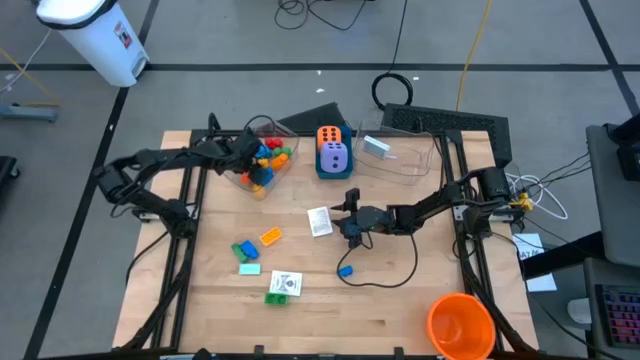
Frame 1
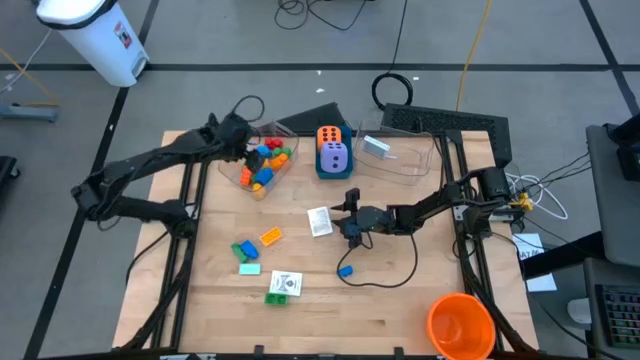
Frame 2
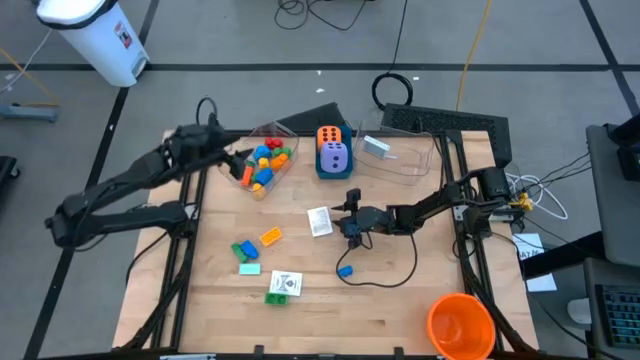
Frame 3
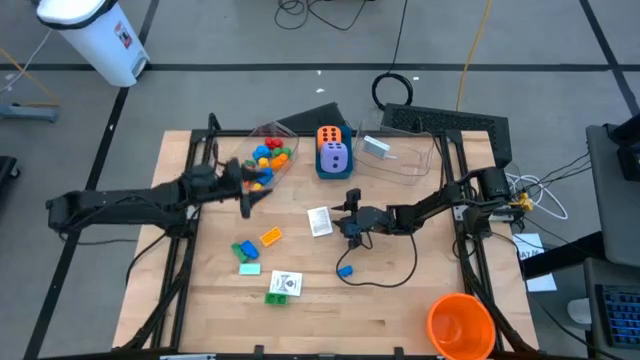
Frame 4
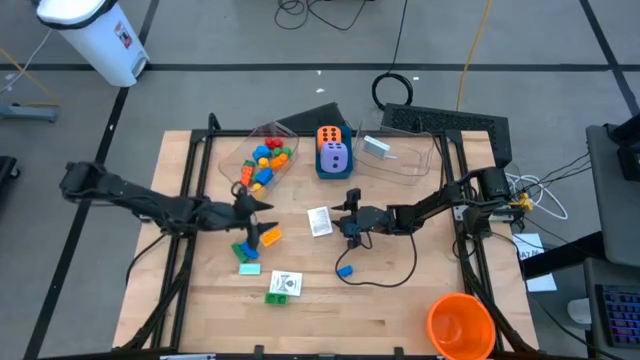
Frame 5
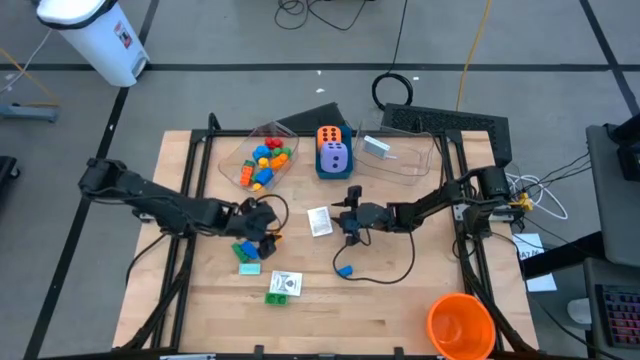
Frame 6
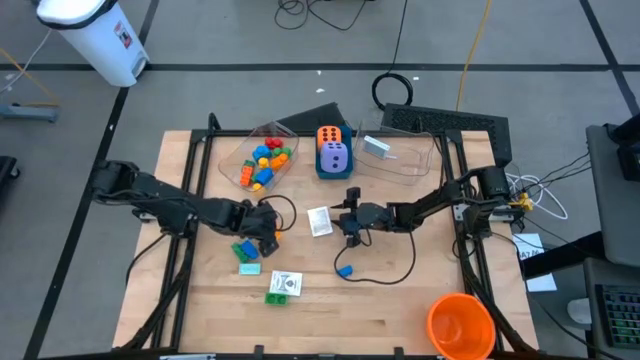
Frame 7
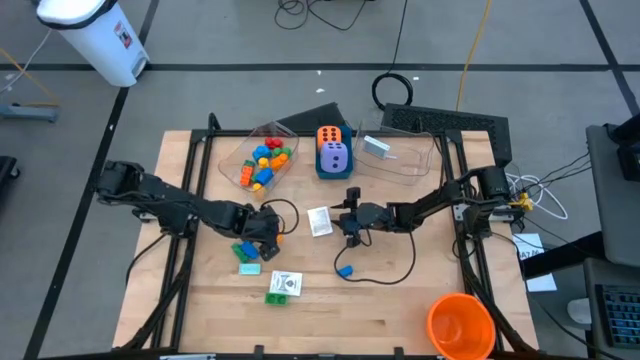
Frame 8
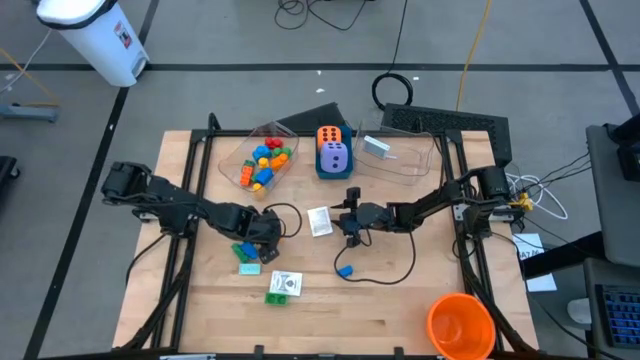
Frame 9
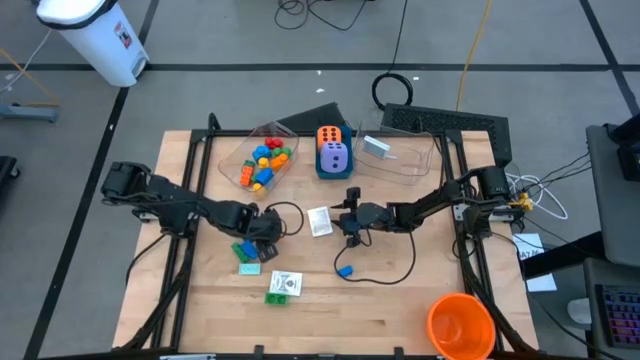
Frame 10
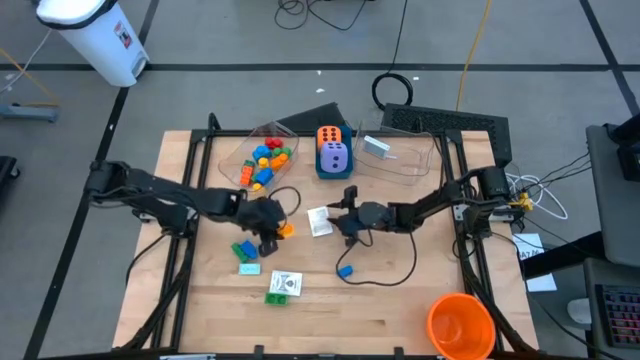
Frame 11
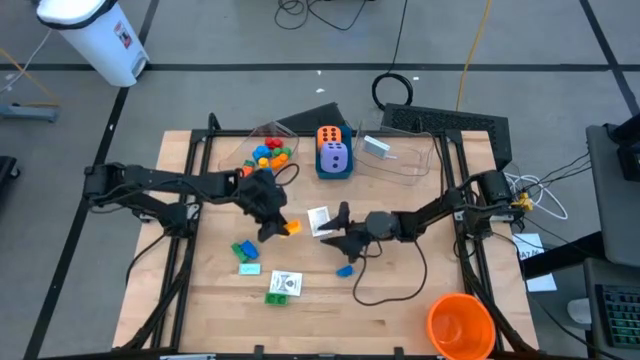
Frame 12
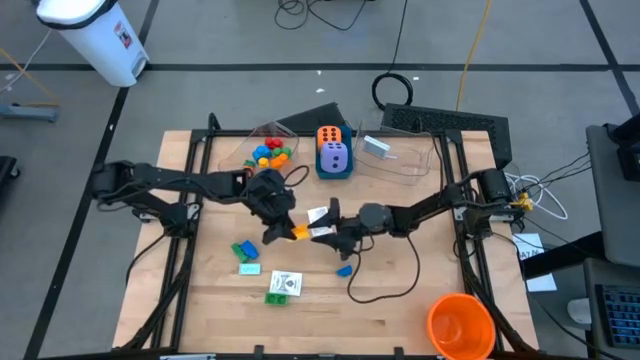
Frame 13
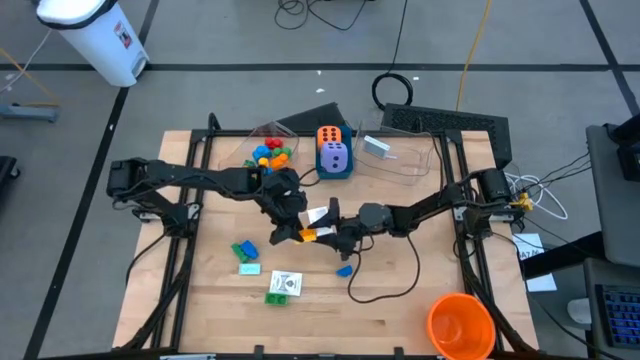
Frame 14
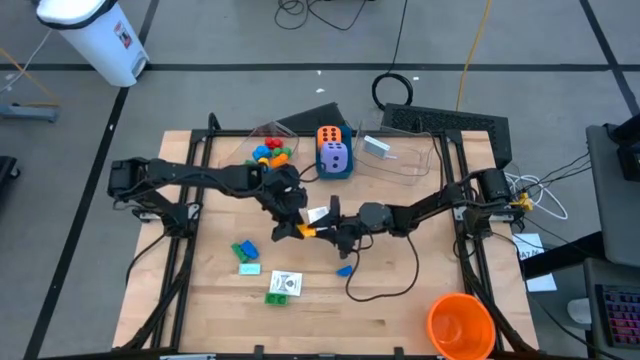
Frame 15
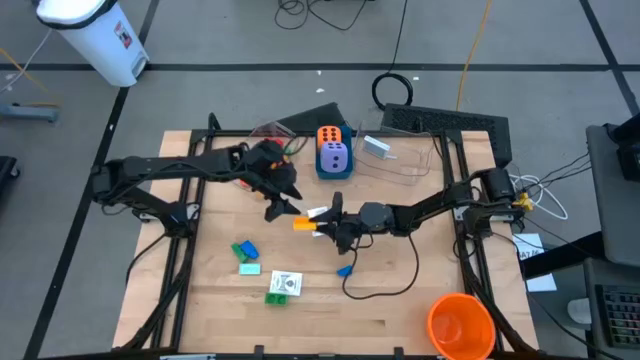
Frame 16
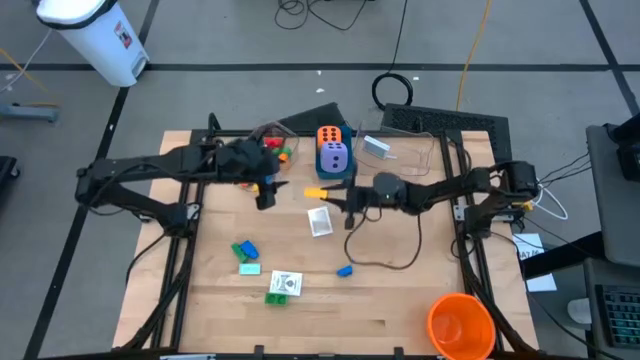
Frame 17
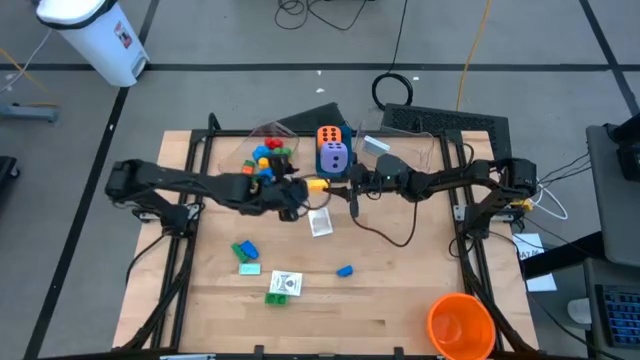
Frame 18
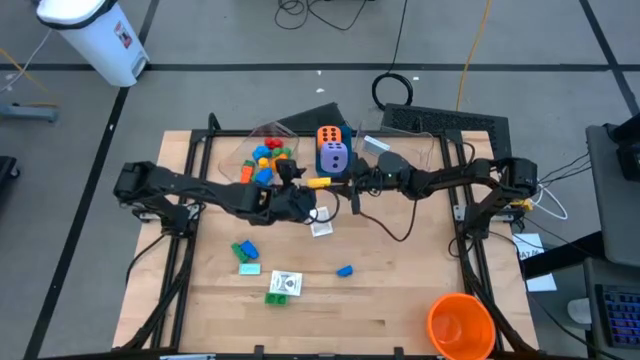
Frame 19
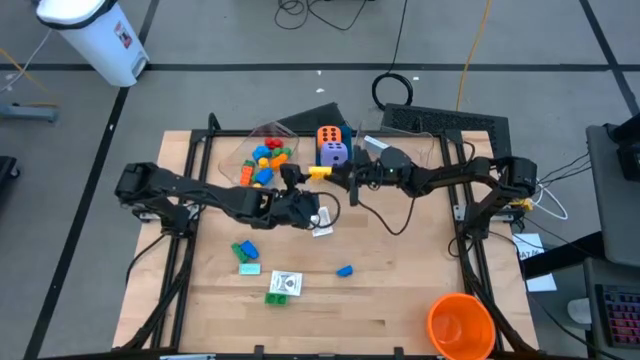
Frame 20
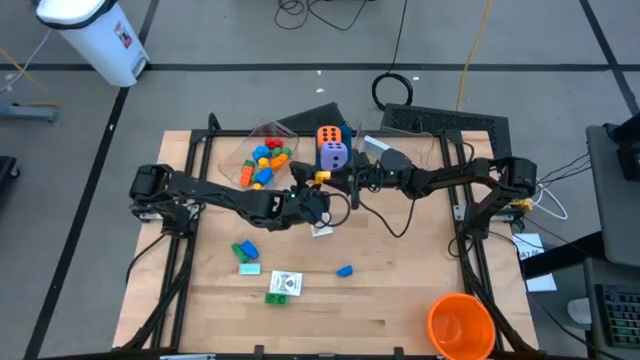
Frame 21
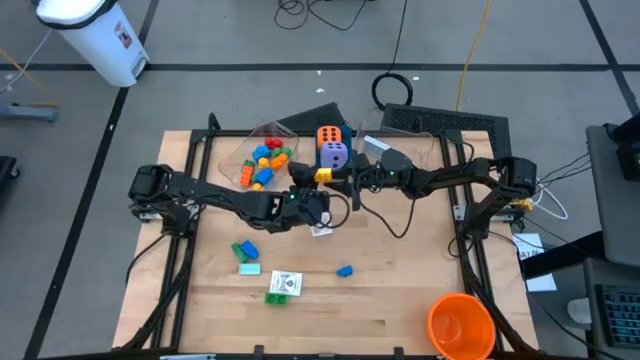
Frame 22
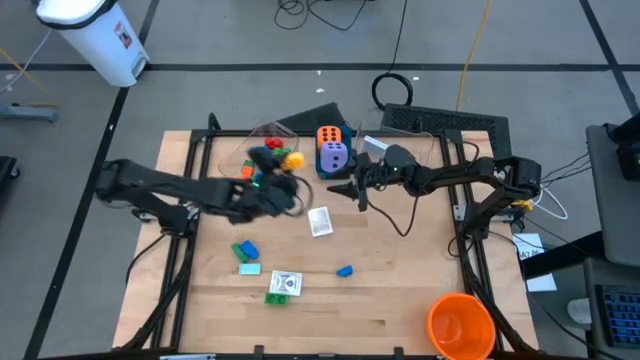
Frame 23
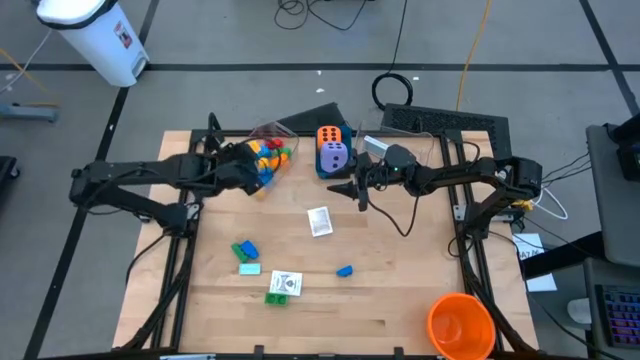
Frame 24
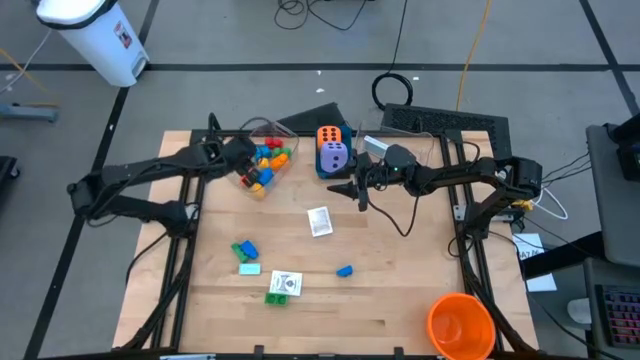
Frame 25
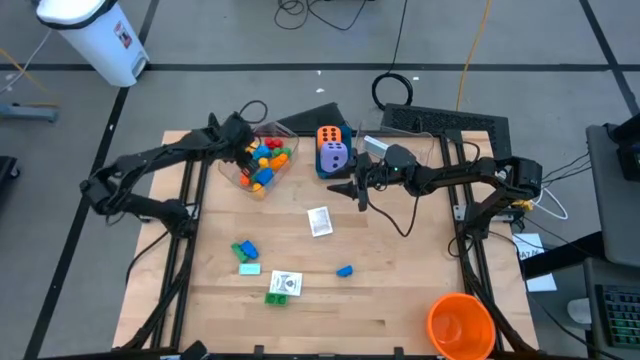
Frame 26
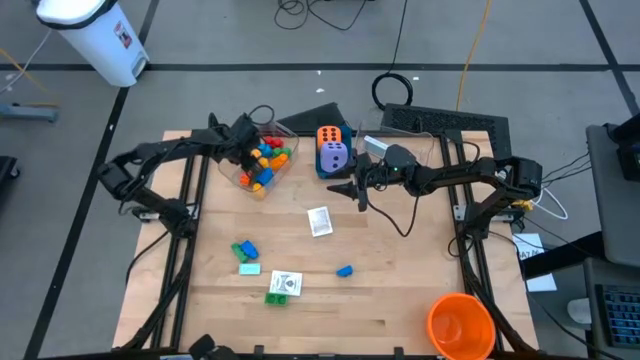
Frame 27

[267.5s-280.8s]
Task: Pick & Place Toys
Put the yellow game piece into the left transparent bin

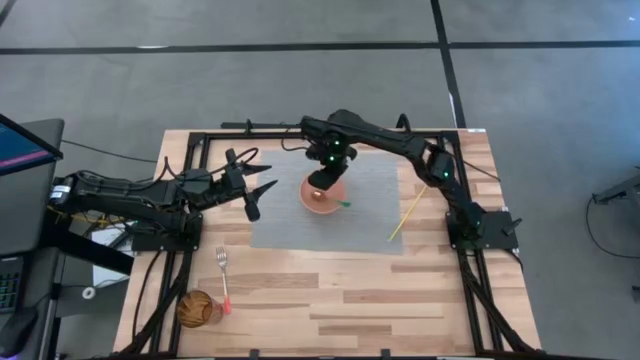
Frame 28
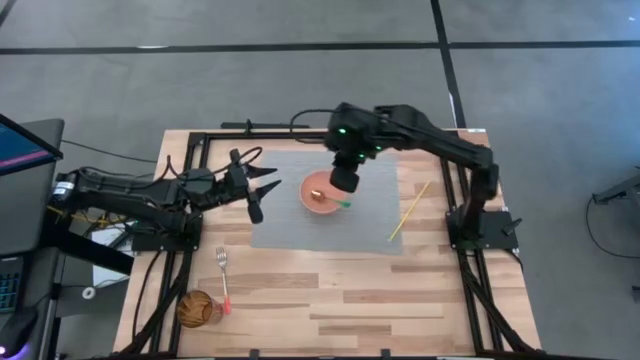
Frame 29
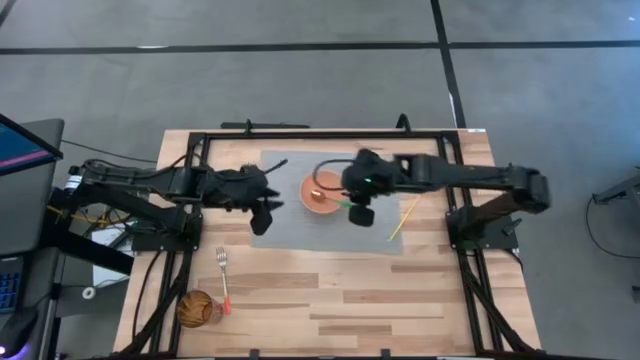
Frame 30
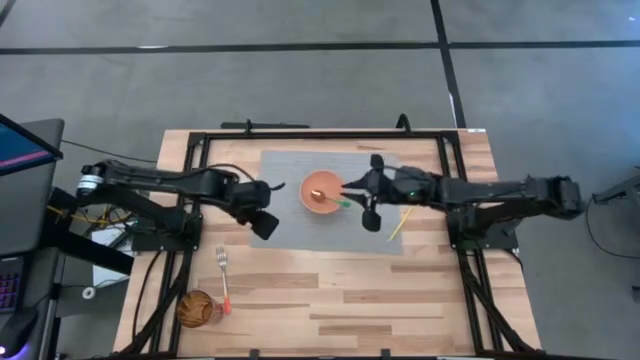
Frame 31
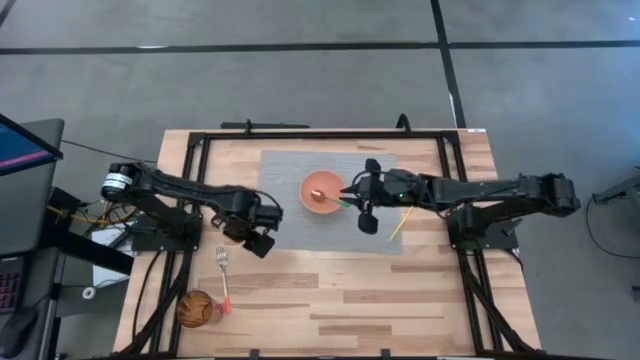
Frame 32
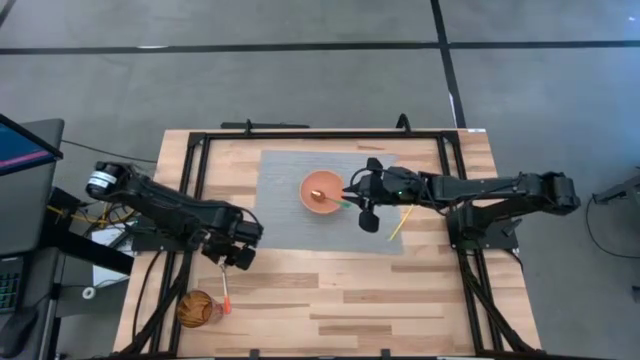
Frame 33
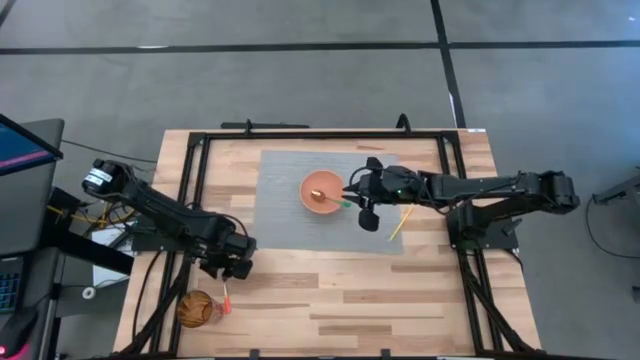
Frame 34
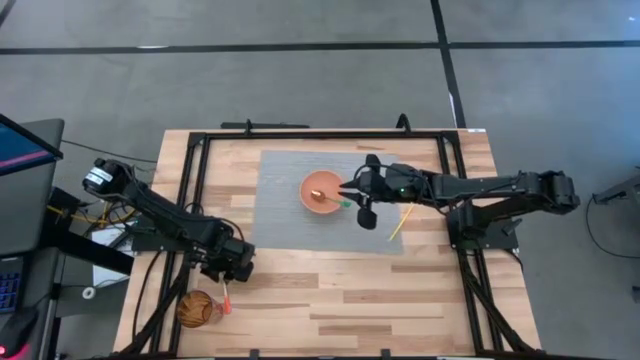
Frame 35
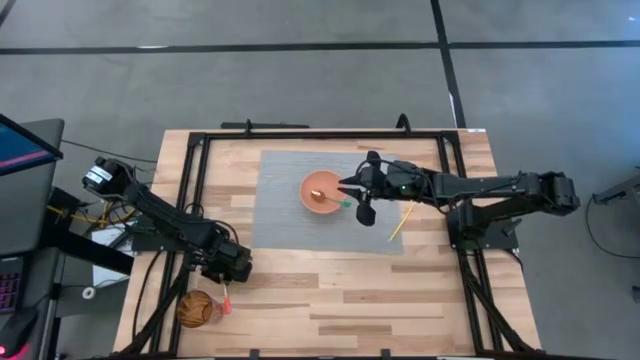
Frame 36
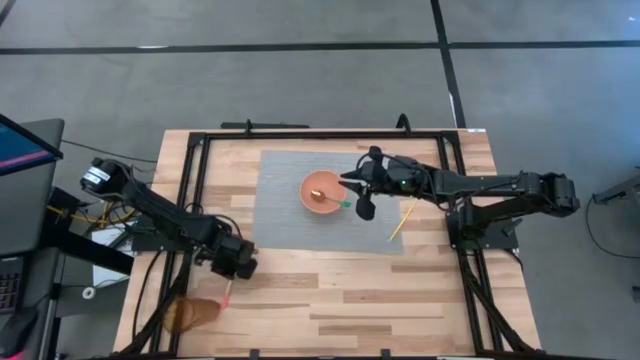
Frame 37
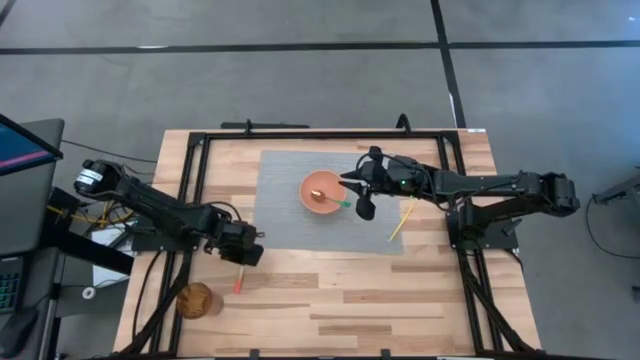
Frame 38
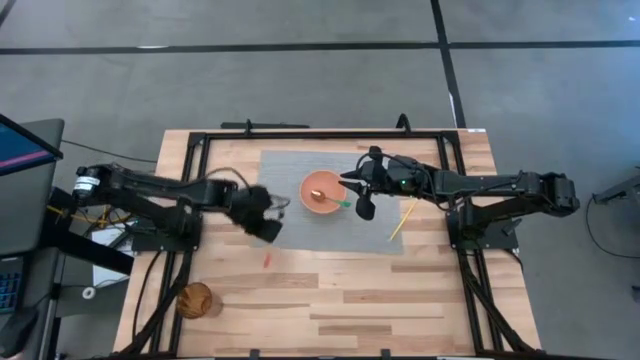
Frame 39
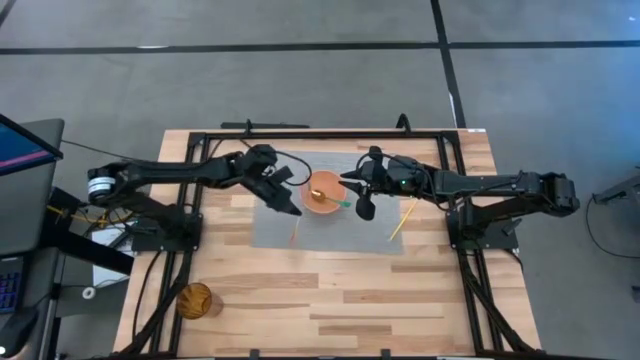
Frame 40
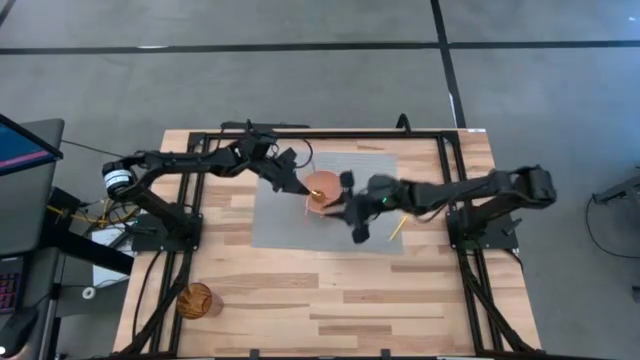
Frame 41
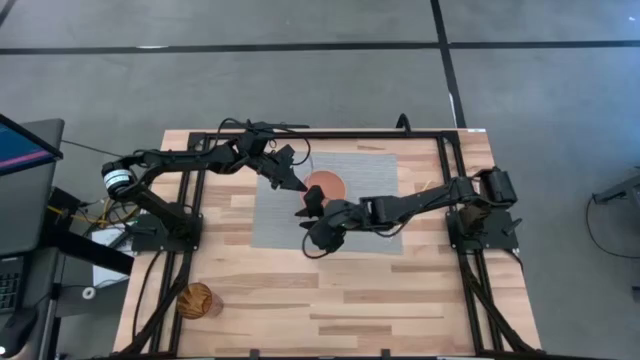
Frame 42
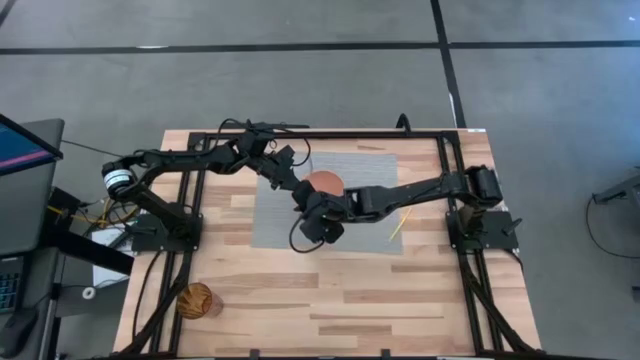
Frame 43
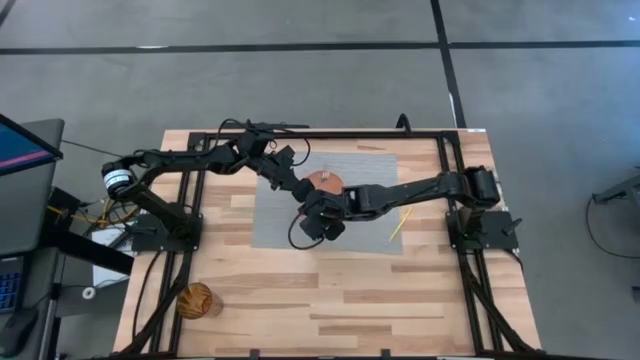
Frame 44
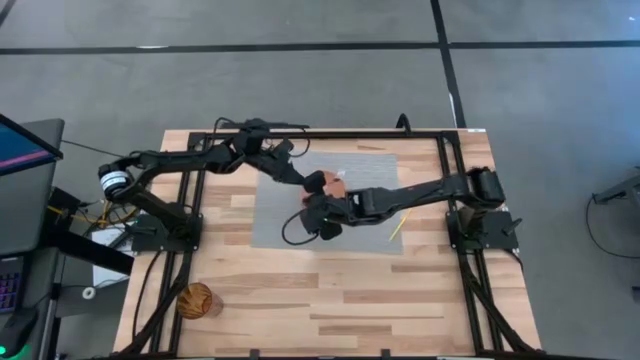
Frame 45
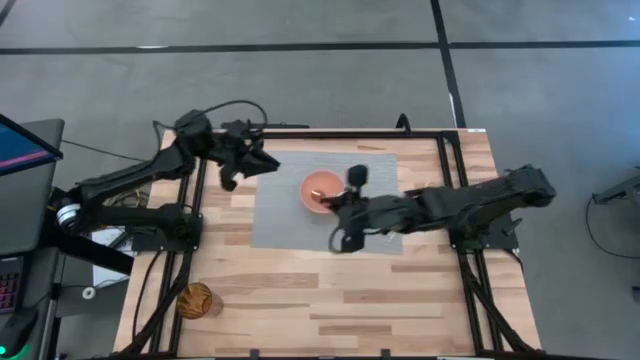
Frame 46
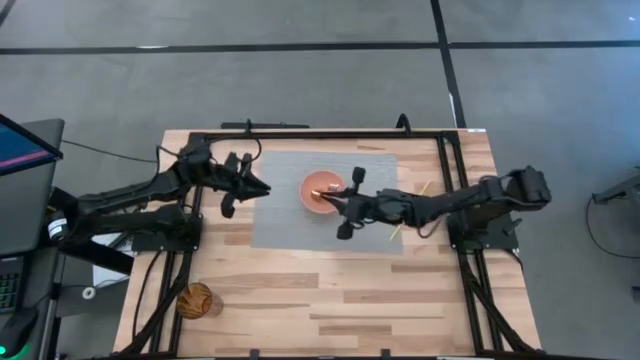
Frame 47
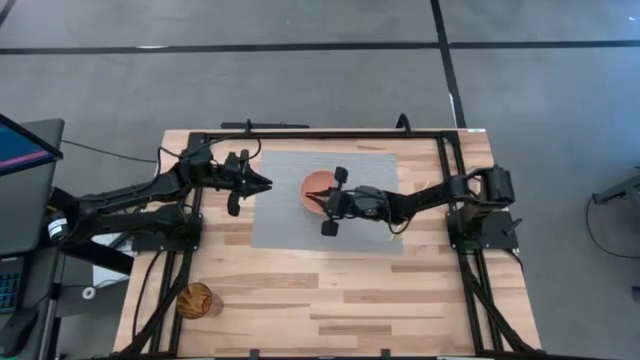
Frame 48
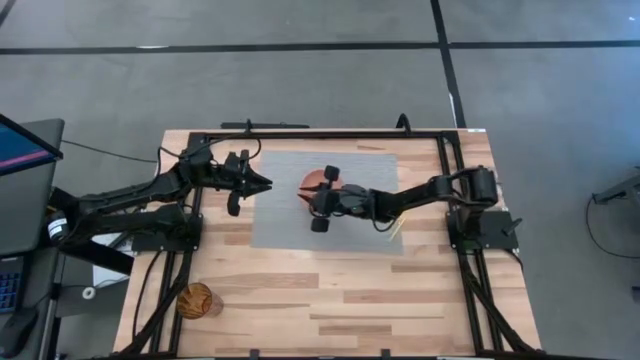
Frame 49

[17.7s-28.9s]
Task: Pick & Place Utensil
Put the white orange fork into the orange bowl on the gray mat
